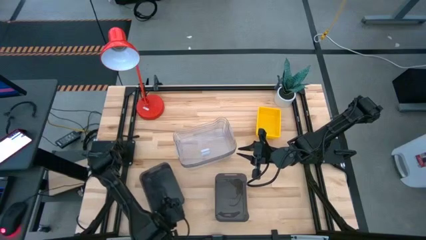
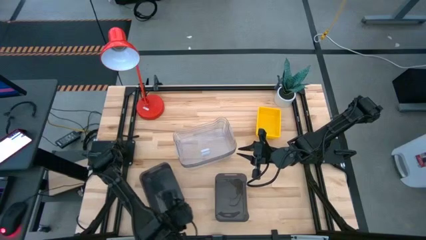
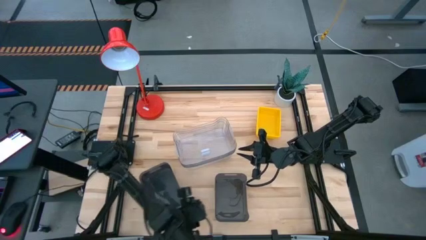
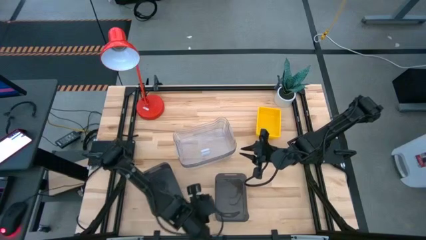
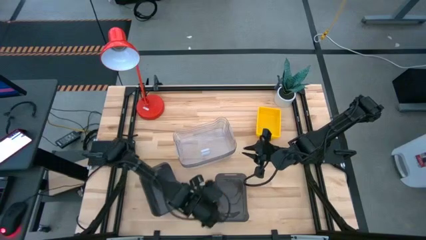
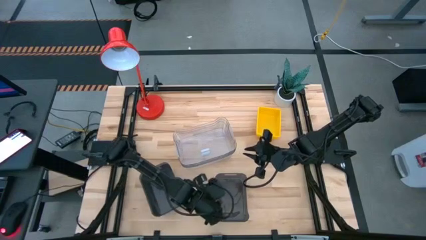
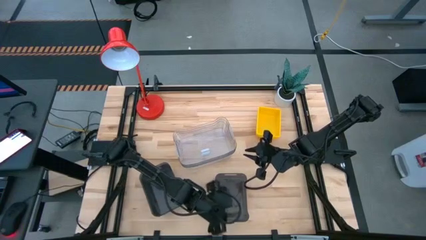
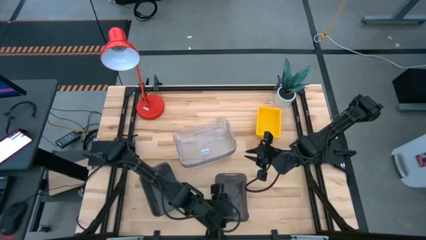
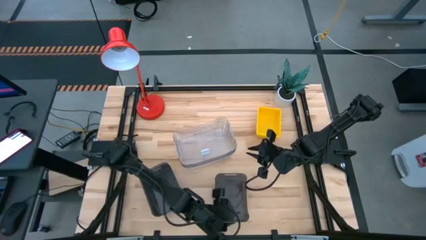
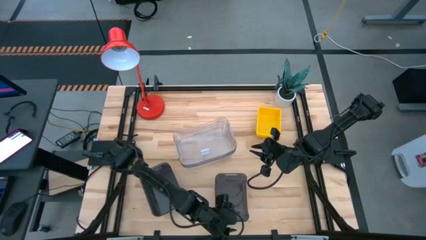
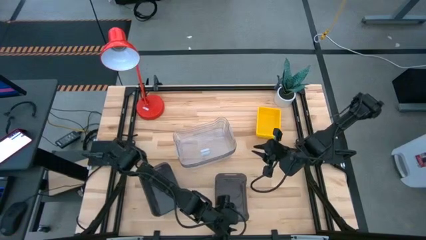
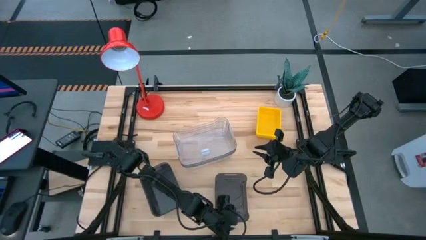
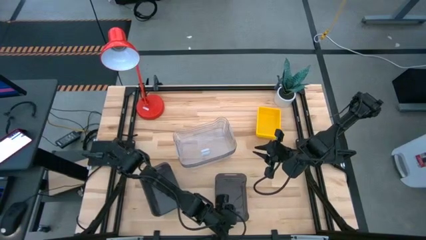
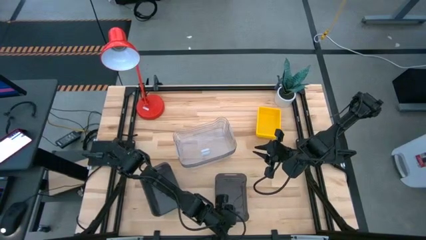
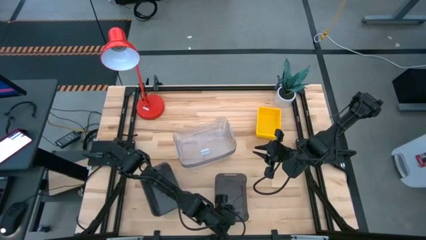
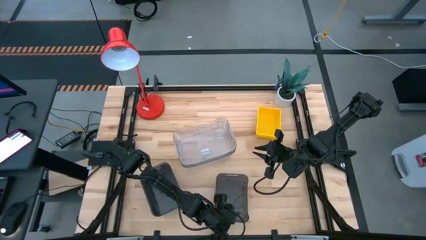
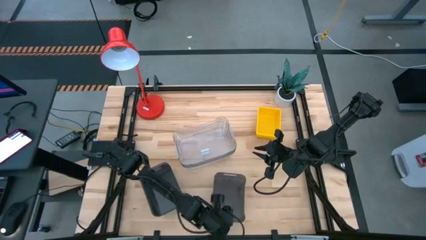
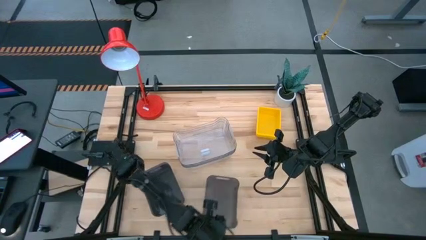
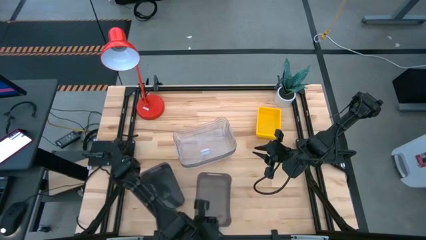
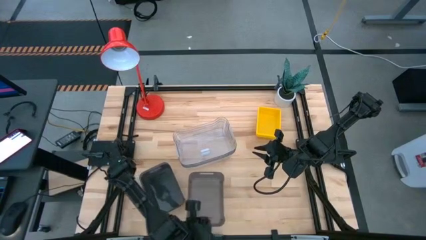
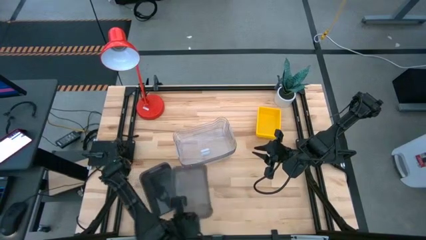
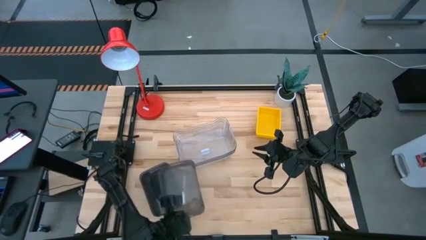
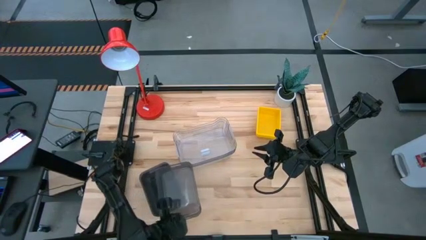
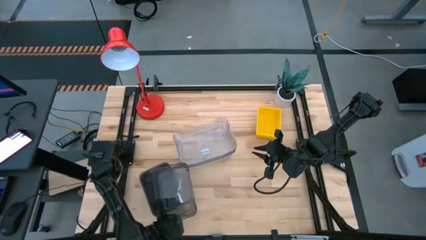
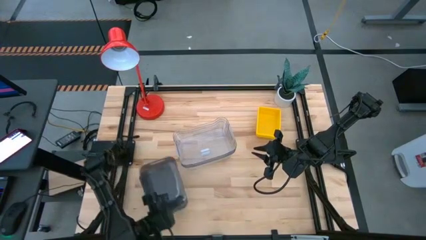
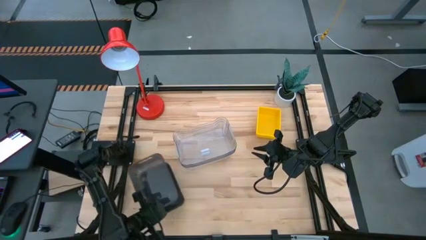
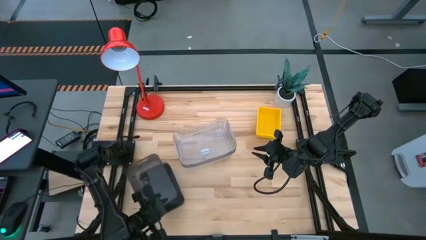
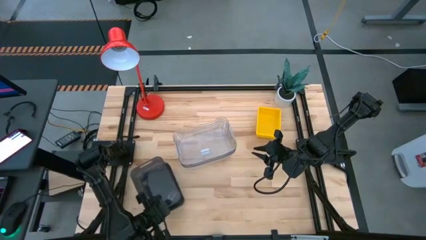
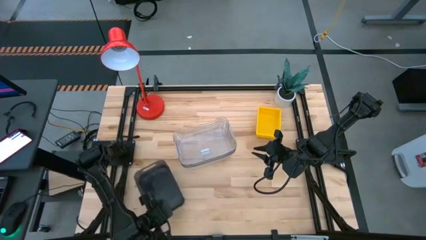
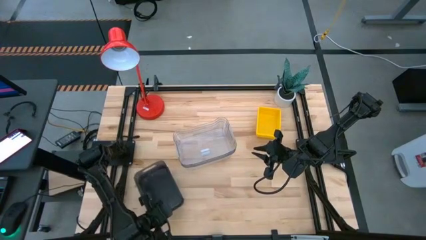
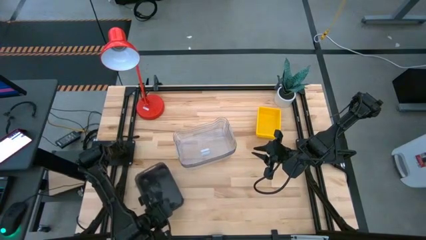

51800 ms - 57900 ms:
Stack the right black bin on the left stacked black bins

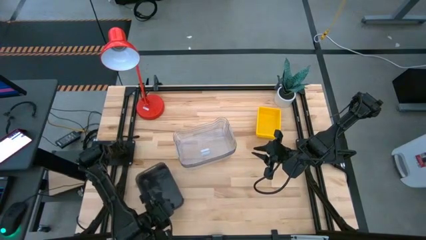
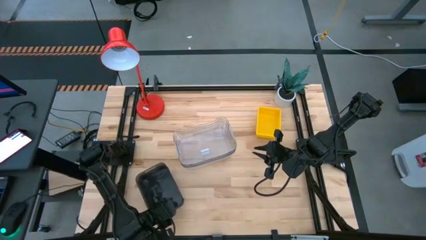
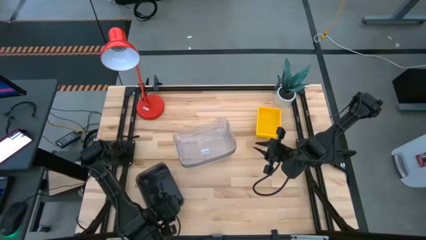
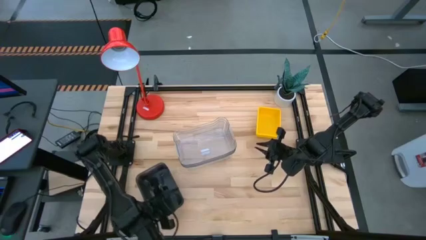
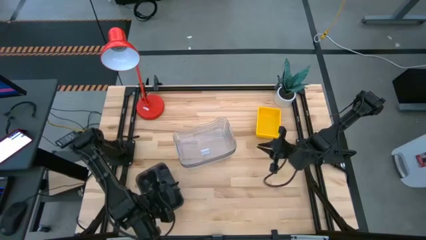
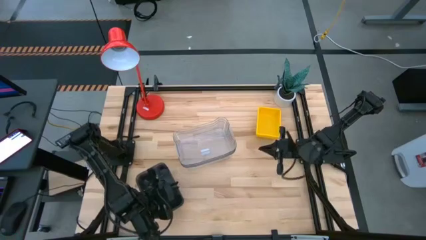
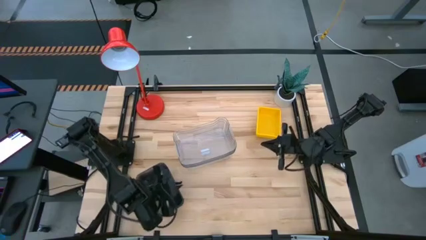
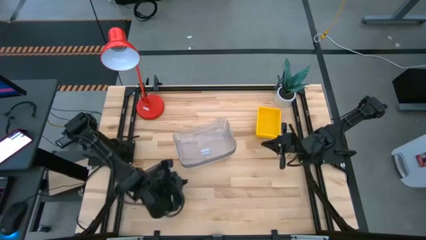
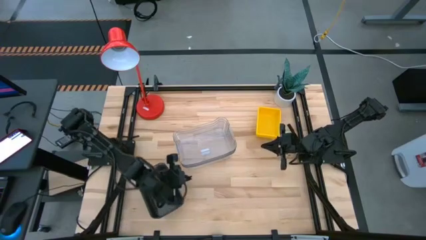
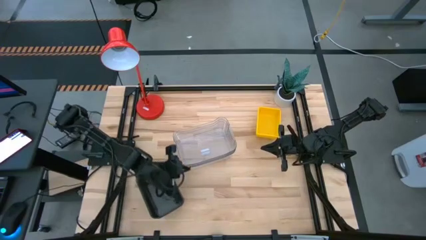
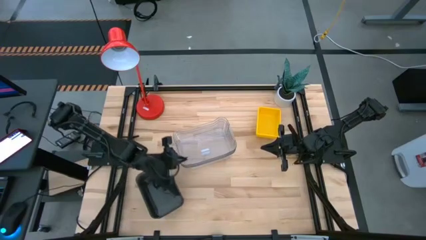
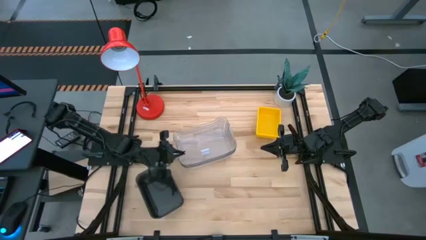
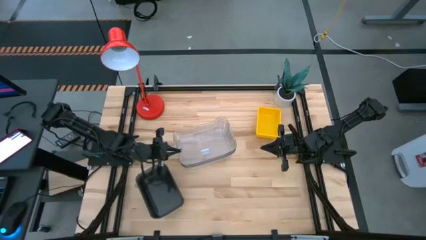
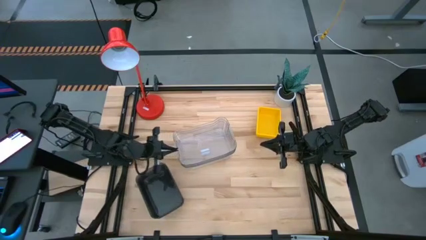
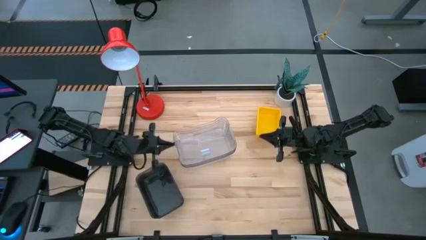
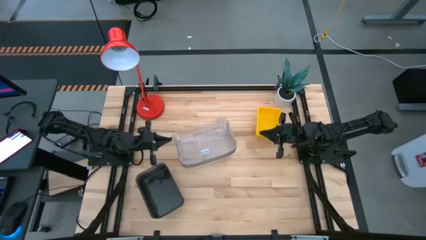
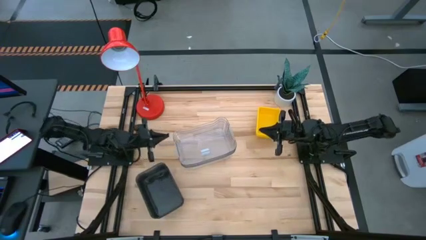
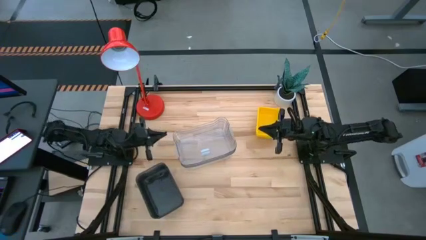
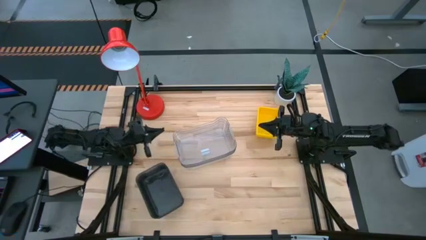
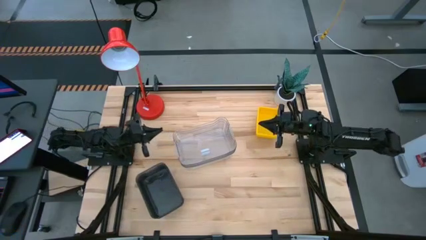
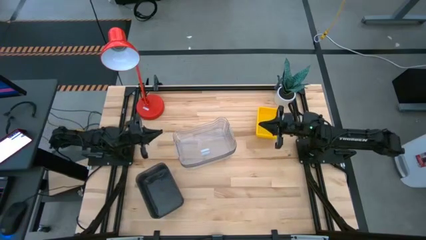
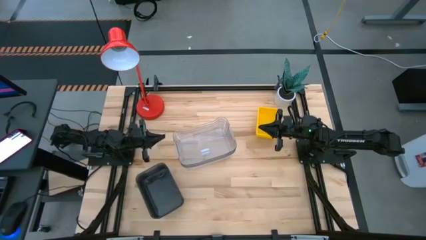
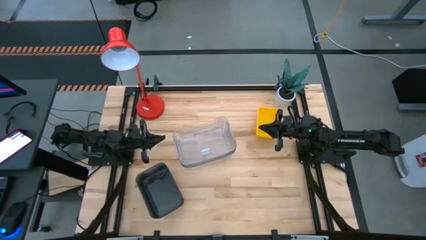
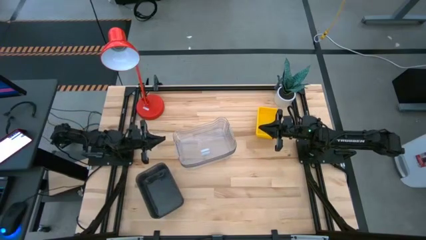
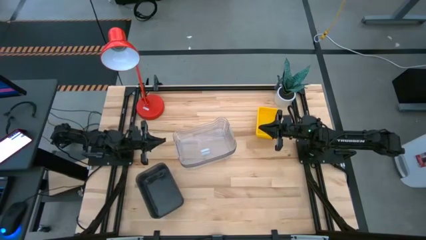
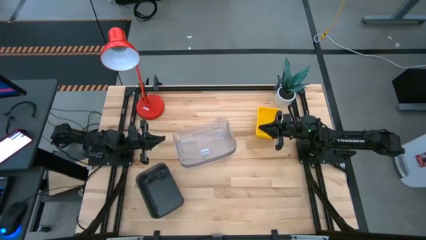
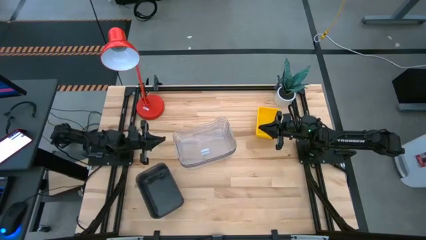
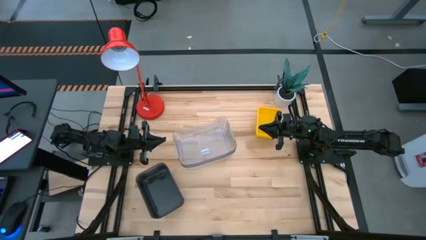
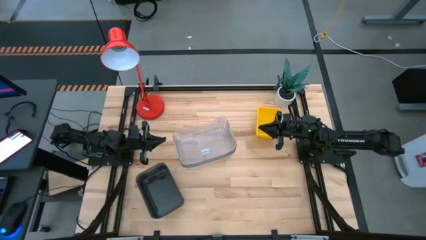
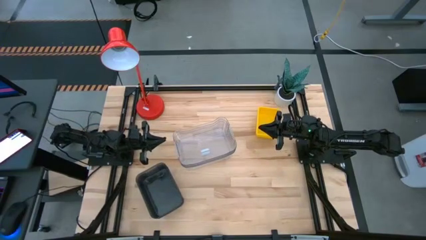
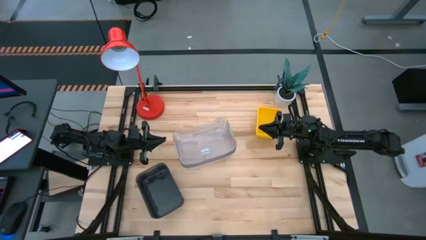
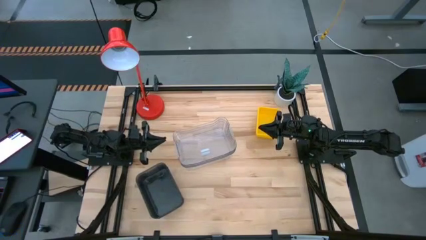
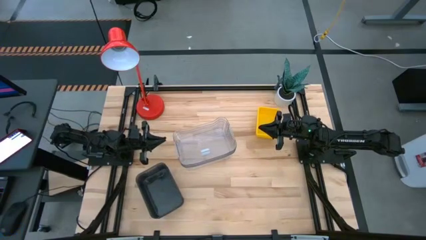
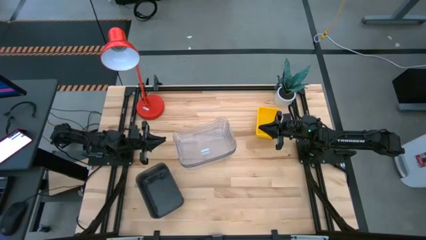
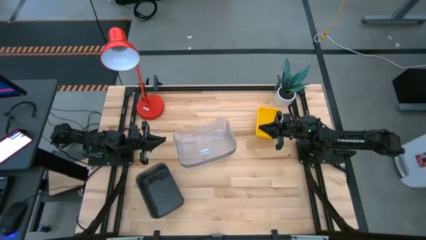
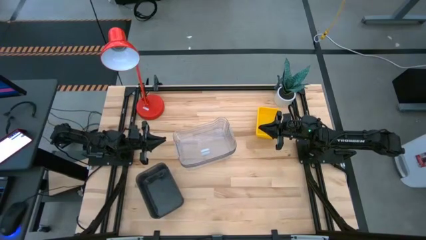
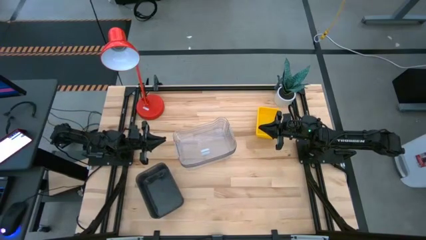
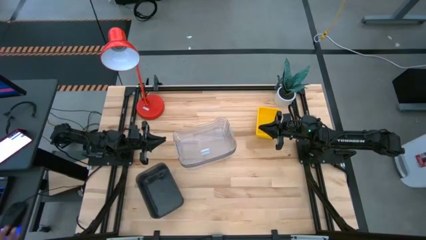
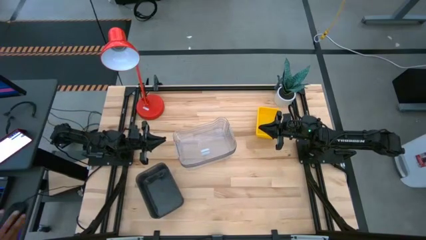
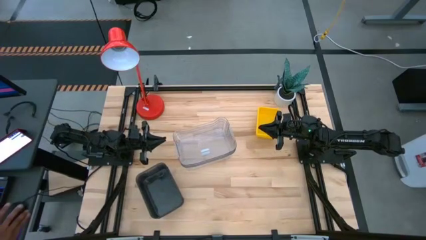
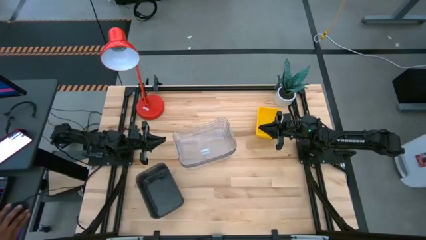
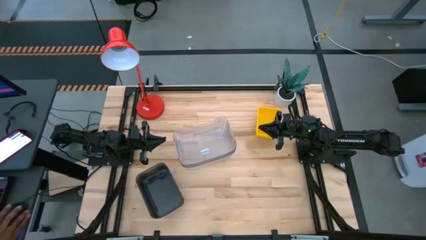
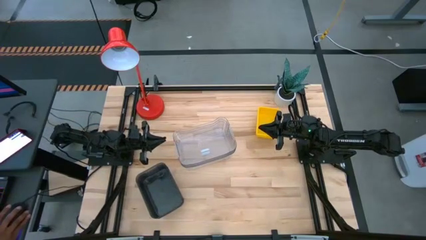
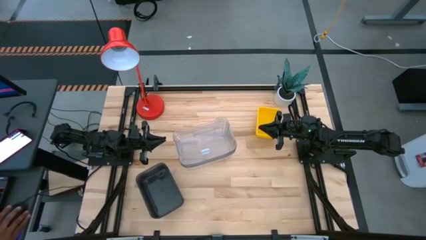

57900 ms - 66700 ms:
Return to Home Position
